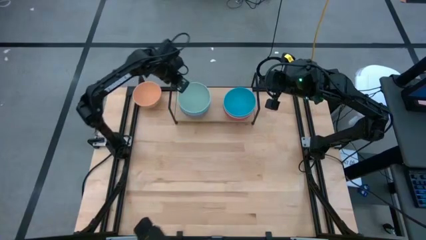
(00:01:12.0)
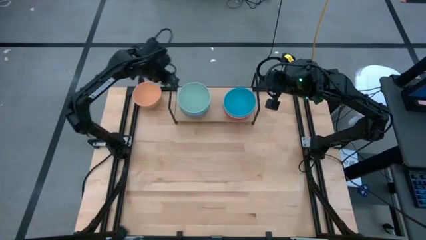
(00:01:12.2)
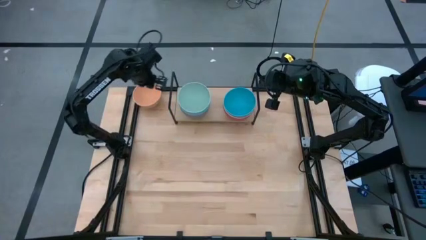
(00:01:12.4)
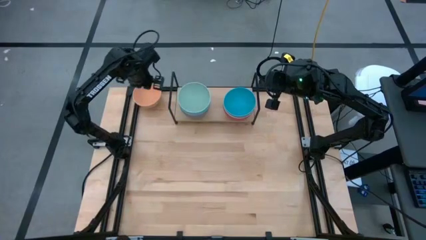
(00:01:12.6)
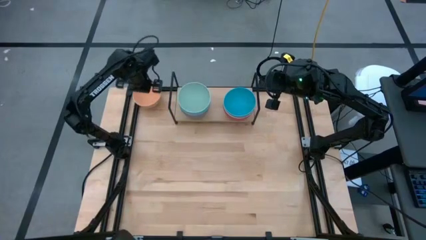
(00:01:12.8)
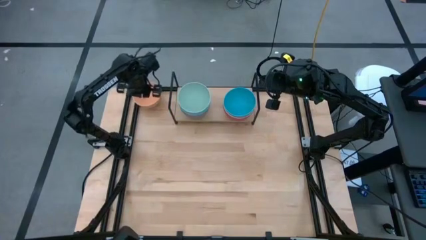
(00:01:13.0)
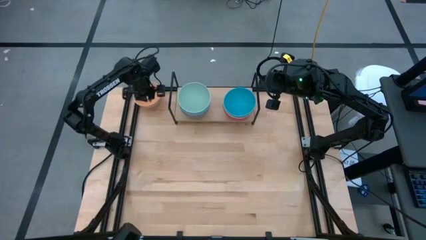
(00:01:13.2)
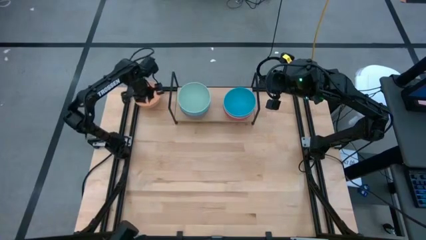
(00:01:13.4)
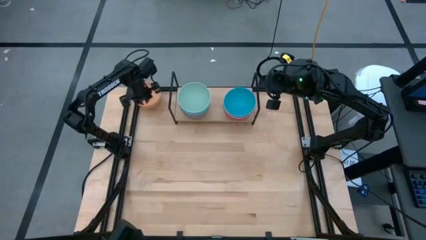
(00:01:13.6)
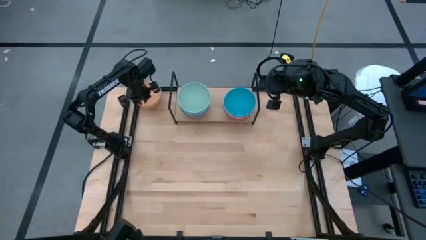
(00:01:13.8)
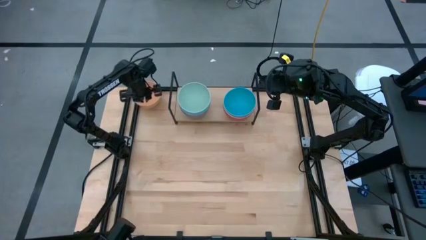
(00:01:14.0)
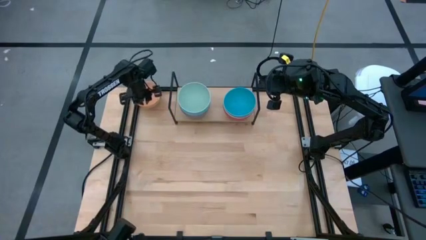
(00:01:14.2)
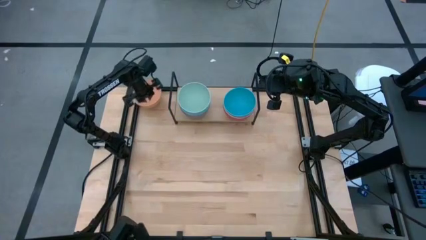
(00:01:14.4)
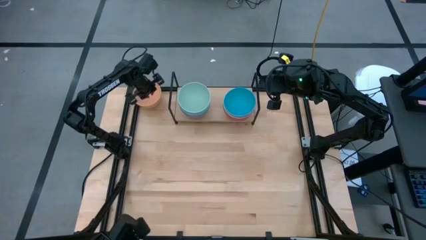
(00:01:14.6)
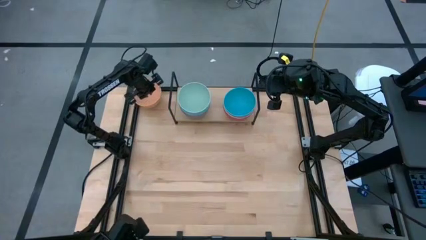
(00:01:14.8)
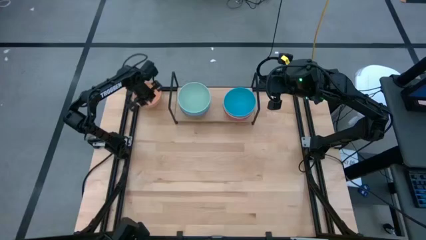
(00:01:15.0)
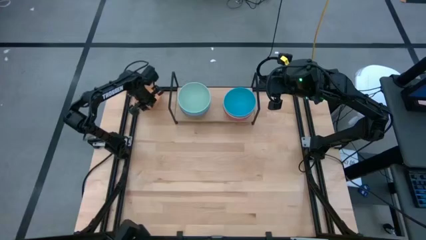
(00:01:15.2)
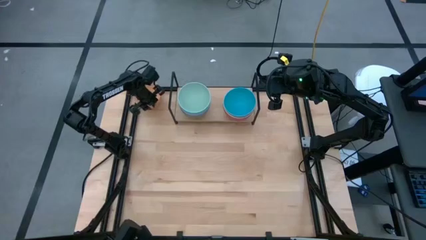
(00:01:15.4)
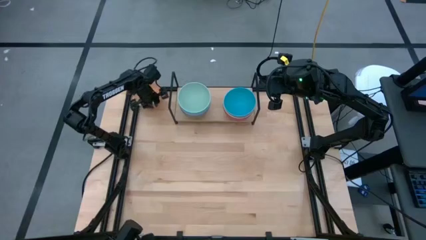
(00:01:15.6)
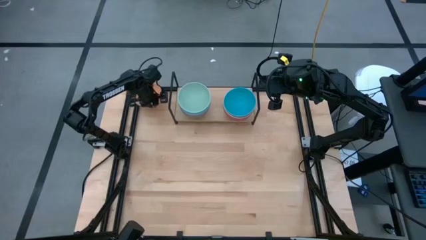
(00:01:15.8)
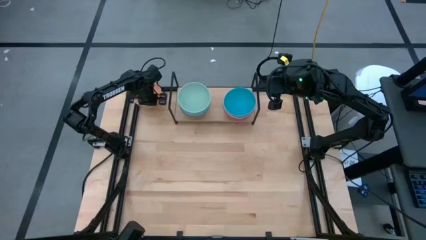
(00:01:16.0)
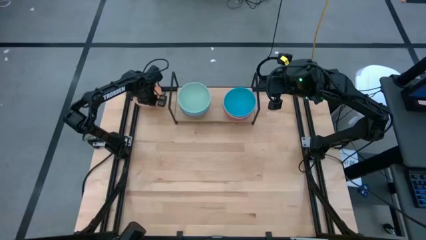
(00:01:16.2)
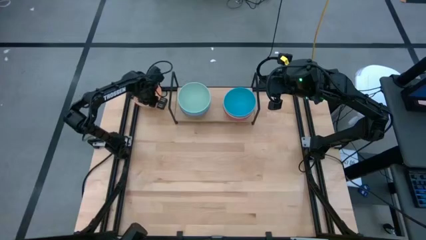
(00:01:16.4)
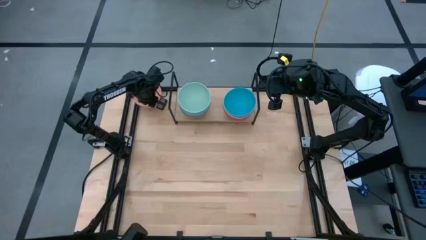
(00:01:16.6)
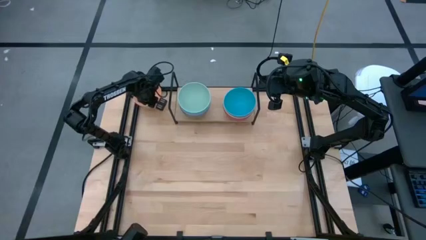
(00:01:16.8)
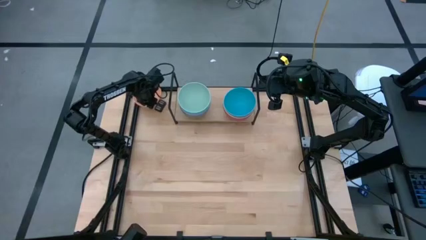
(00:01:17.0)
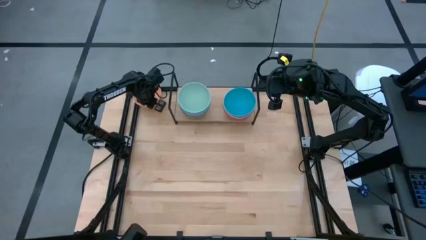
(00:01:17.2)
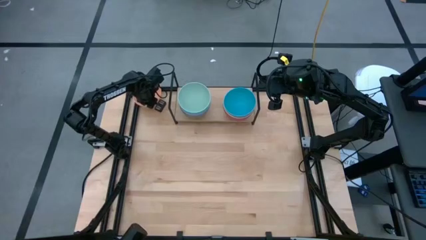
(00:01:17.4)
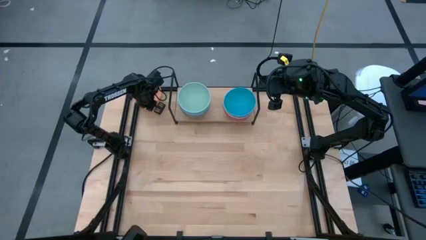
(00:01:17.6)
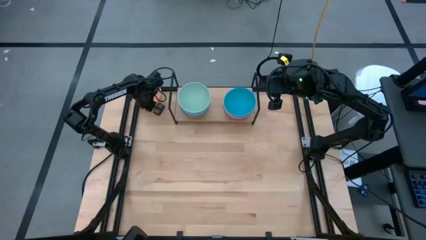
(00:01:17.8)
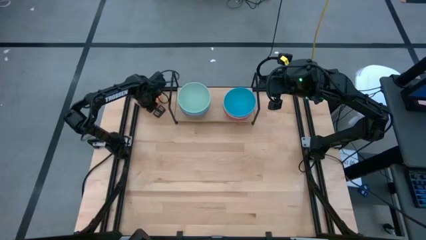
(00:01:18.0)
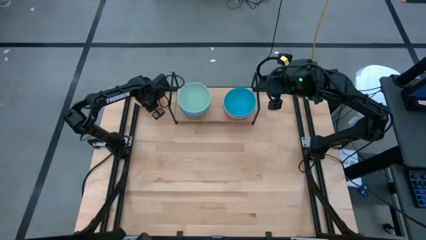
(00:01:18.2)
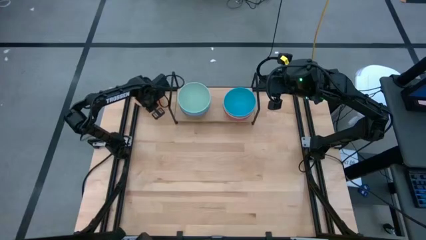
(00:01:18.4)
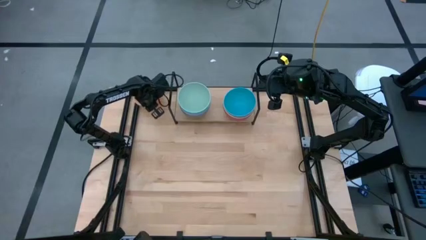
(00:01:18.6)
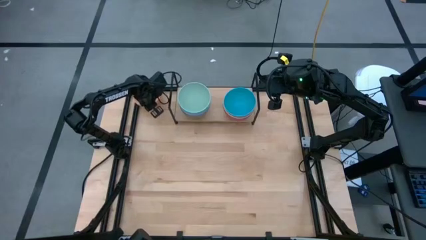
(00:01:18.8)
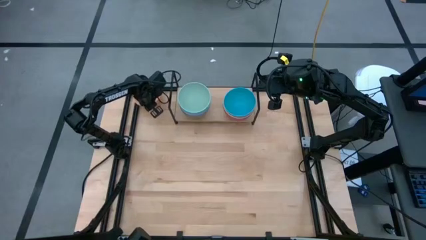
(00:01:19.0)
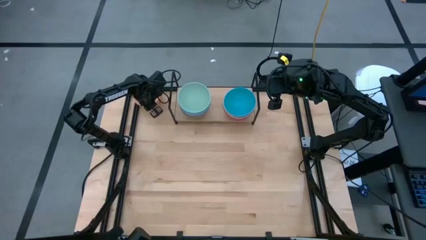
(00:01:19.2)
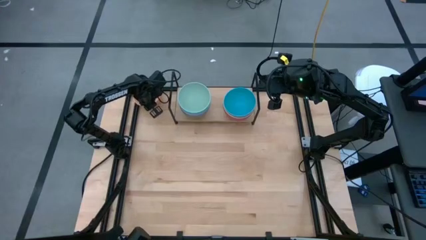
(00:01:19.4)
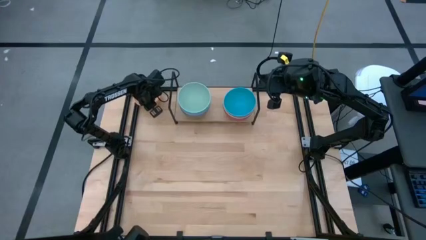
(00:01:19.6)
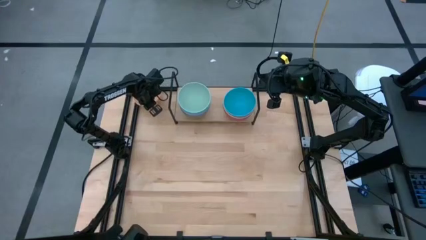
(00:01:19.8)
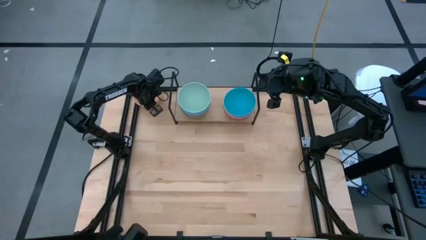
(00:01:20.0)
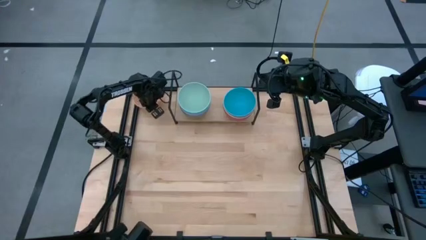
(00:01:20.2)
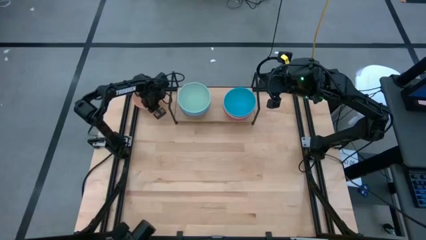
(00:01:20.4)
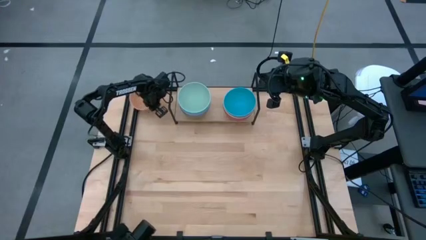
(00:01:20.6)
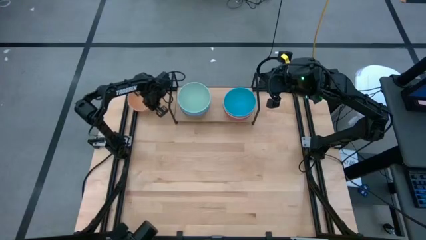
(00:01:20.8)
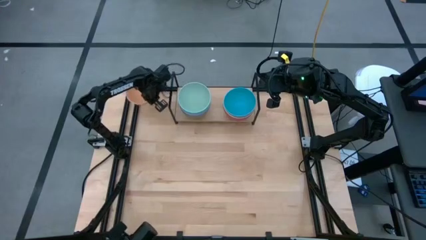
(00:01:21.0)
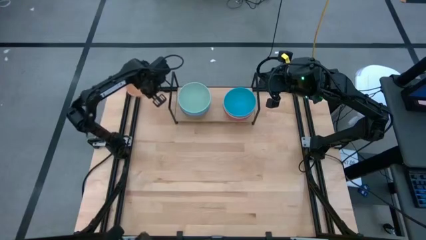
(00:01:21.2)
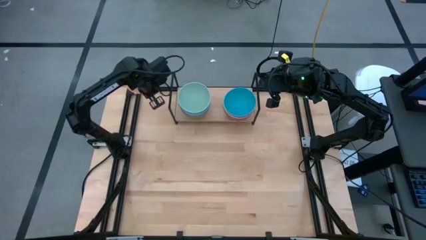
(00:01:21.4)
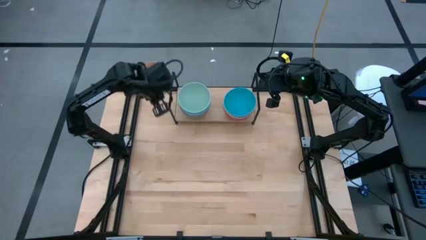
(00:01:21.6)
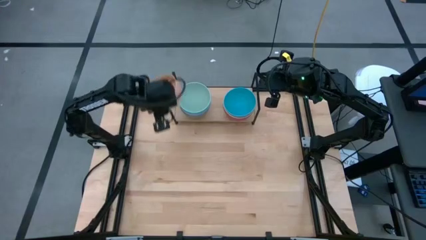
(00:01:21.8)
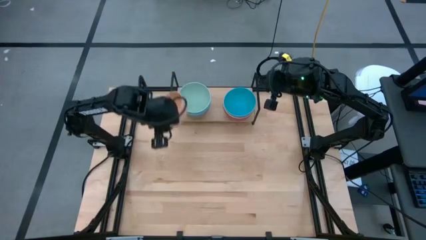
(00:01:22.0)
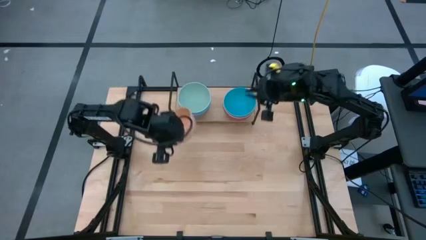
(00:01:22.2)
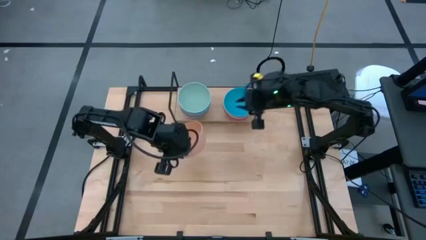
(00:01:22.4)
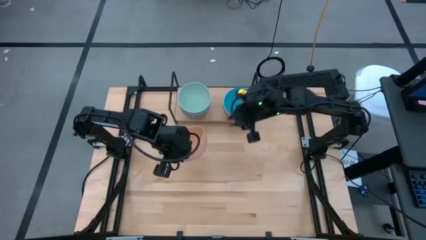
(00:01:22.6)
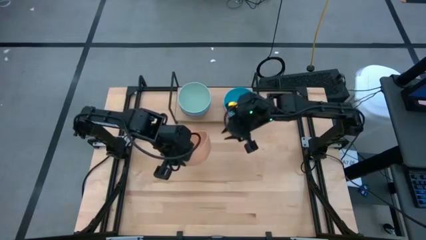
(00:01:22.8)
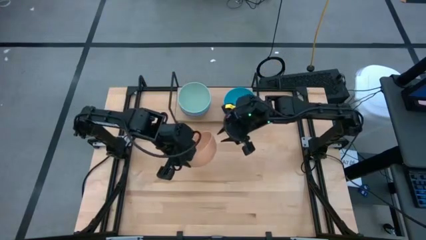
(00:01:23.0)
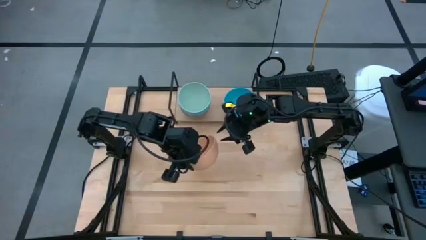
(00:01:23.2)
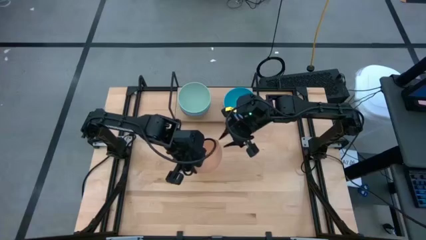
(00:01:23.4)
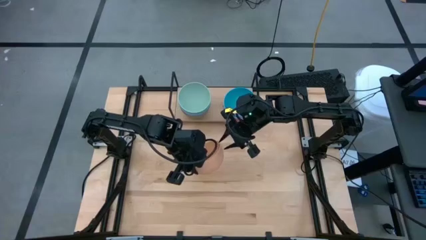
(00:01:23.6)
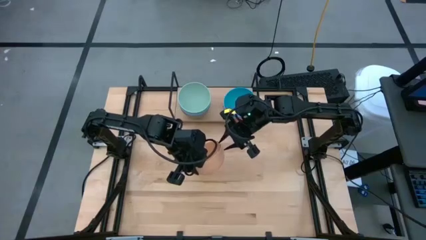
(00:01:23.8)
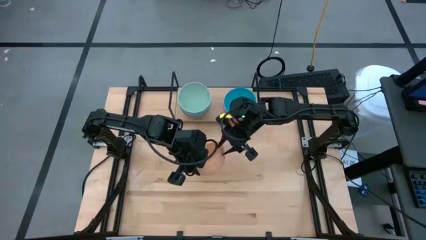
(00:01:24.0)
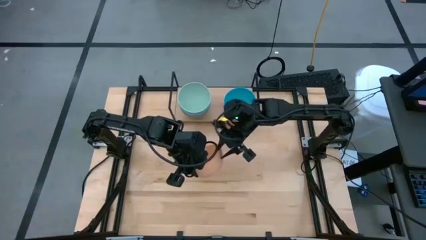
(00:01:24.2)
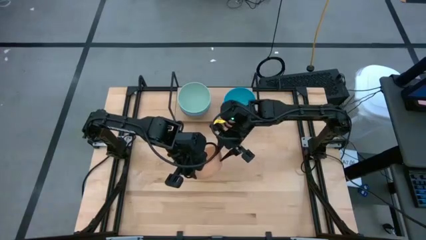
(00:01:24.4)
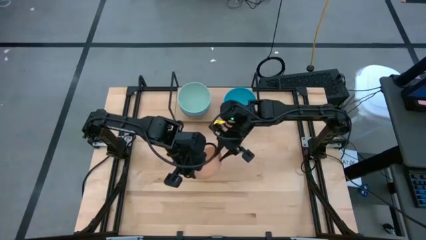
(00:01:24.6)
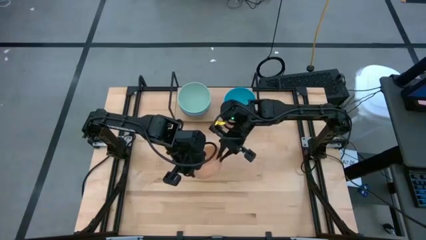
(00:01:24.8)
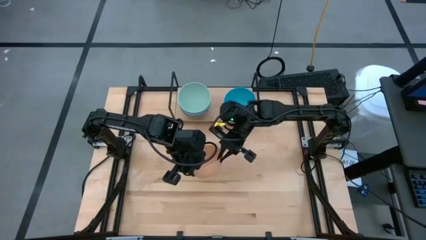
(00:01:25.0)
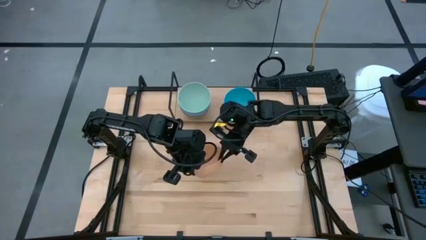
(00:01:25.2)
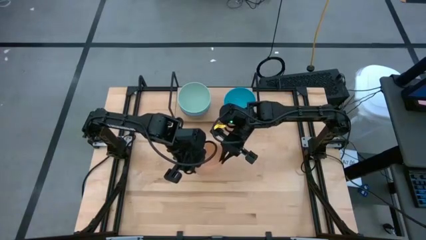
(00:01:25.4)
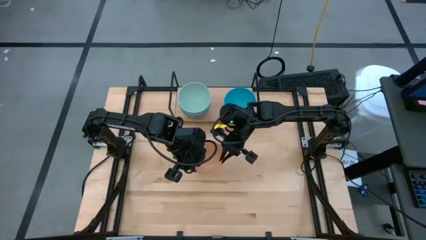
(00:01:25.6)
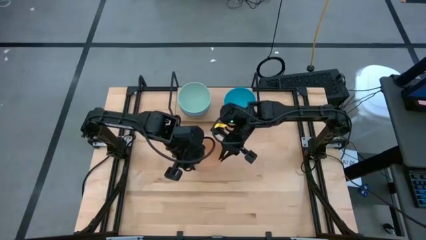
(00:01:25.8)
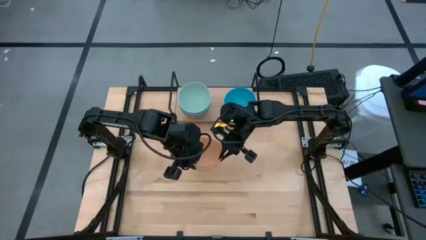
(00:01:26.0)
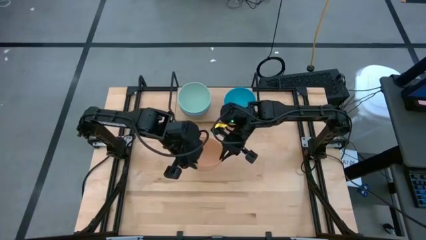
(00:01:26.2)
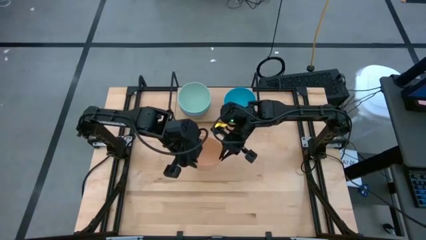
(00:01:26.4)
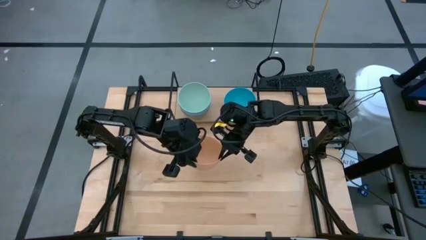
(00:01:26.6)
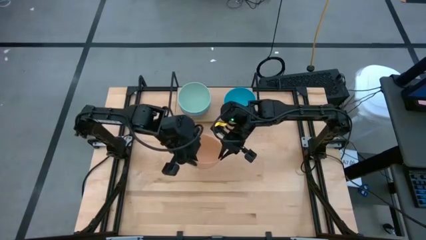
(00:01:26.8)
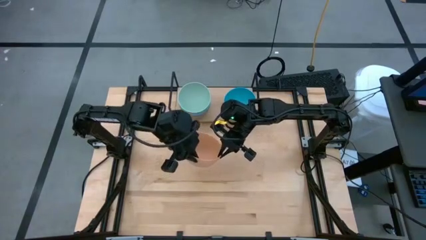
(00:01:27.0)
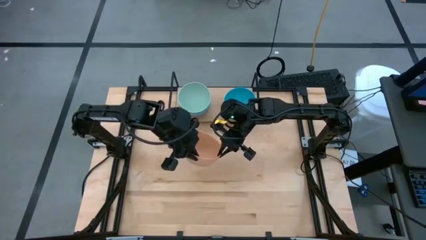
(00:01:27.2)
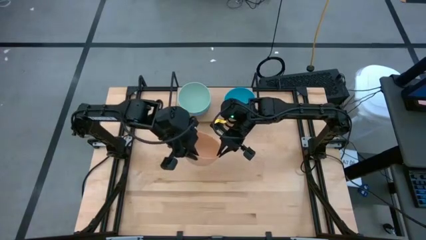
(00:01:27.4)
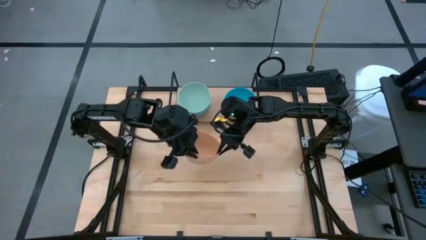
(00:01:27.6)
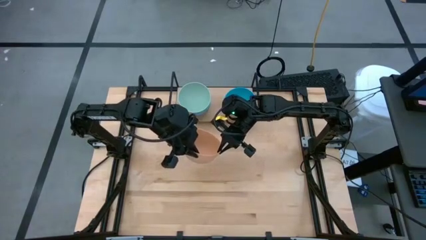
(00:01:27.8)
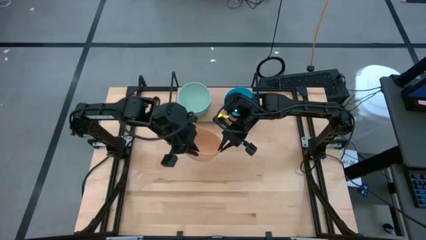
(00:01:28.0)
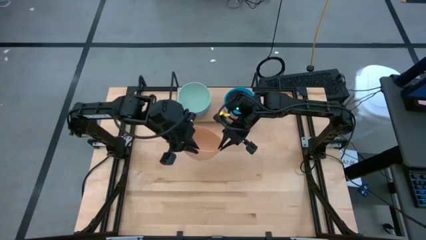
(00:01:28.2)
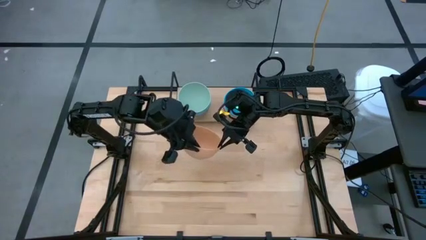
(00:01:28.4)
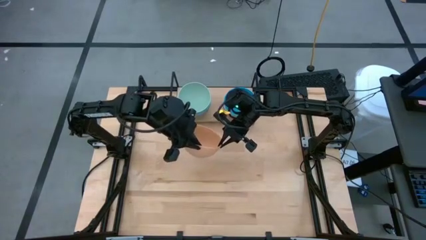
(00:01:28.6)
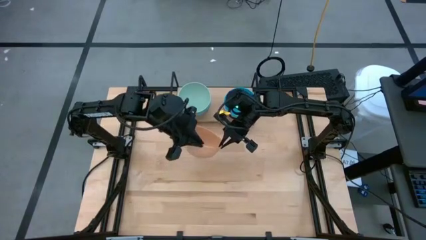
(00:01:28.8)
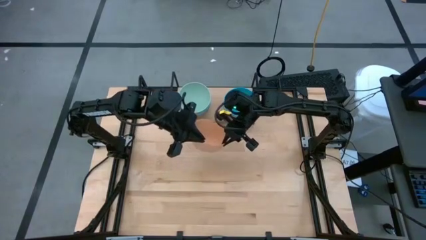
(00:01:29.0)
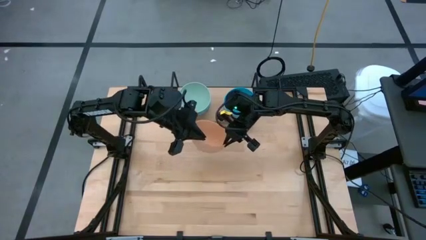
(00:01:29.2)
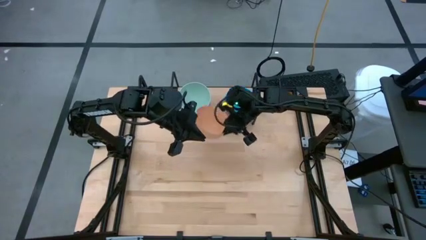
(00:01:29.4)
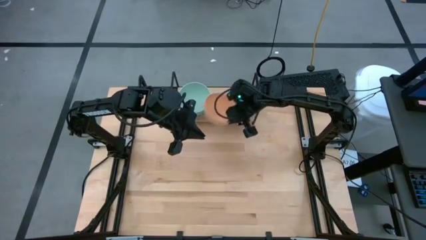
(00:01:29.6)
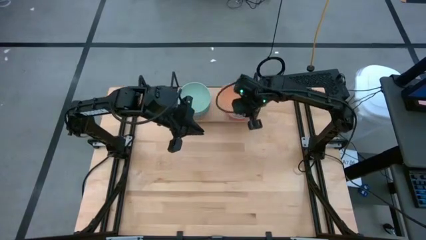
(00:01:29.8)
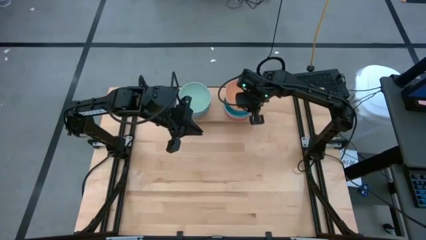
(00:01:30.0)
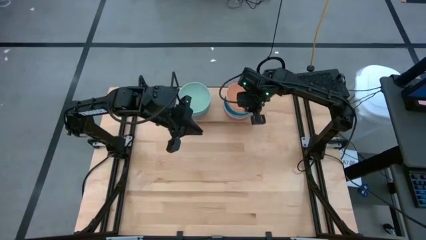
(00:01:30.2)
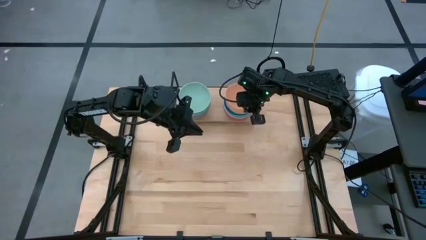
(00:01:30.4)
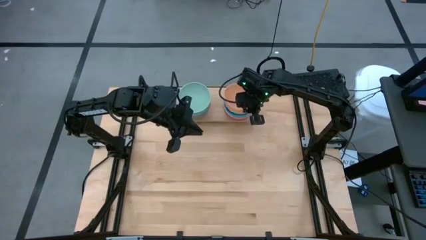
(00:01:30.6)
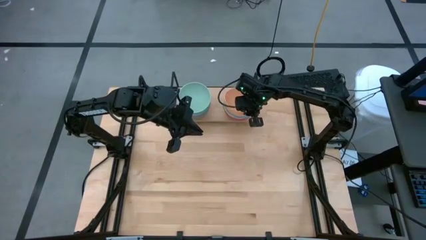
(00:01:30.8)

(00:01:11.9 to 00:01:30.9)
Task: Place and stack bowls onto a shelf
Stack the orange bowl on top of the blue bowl on the shelf
